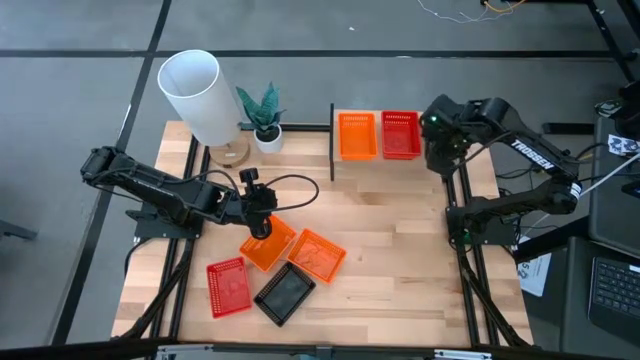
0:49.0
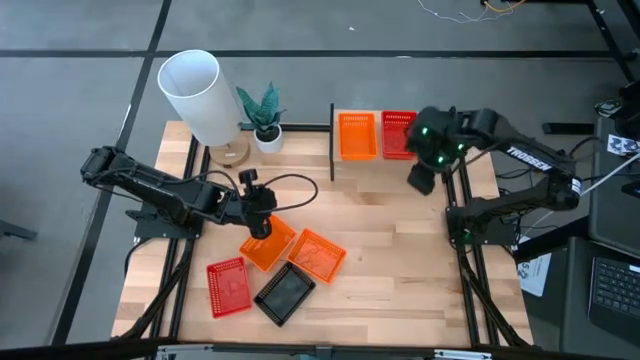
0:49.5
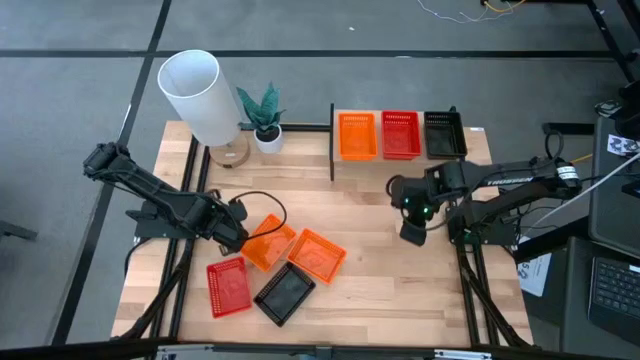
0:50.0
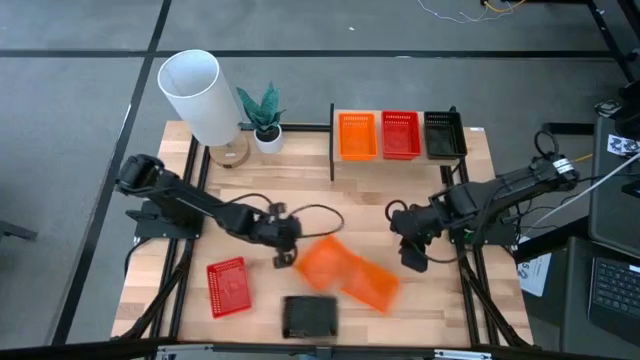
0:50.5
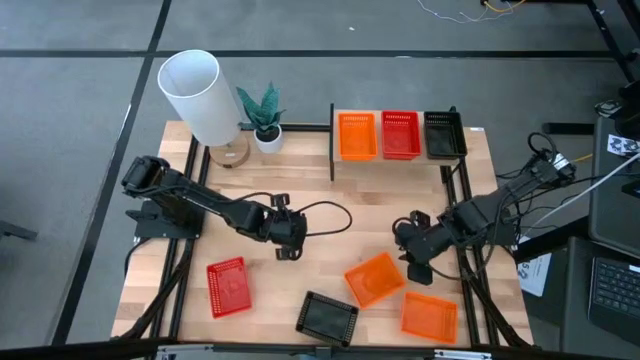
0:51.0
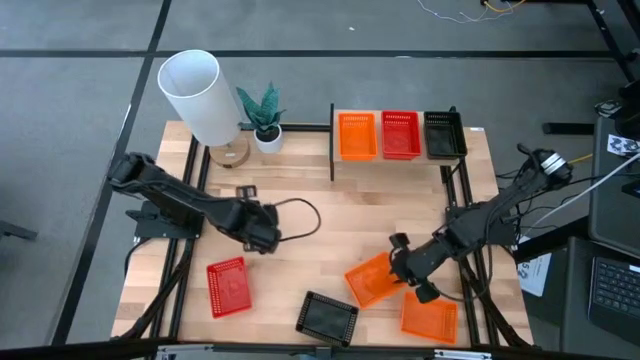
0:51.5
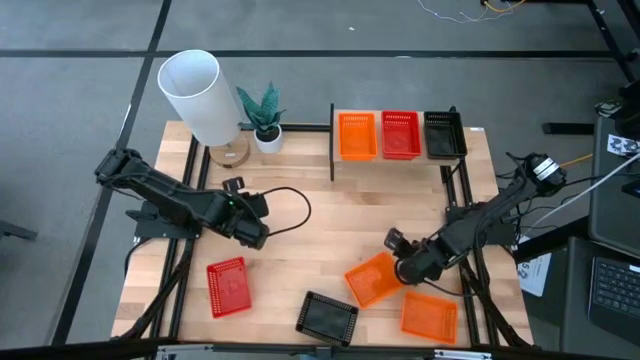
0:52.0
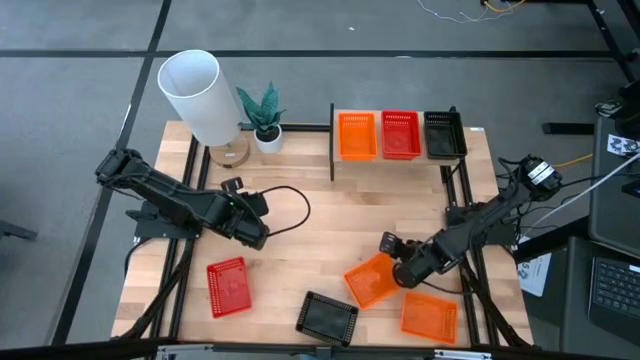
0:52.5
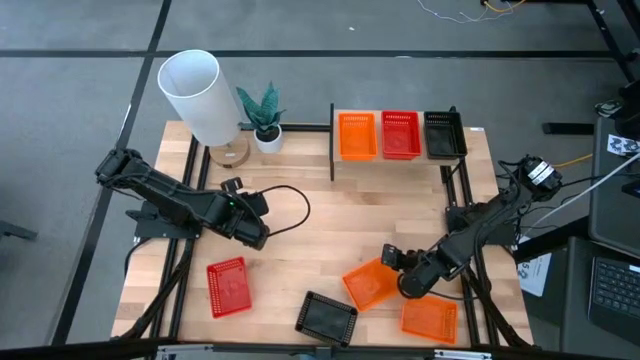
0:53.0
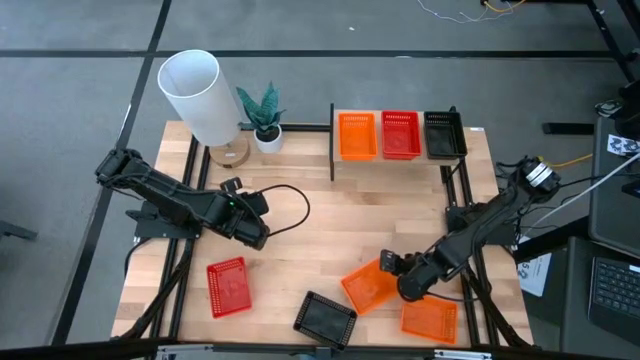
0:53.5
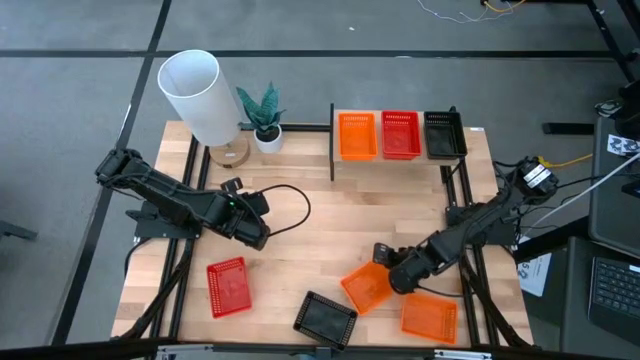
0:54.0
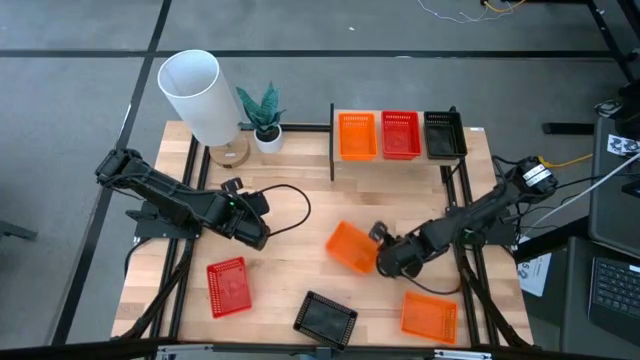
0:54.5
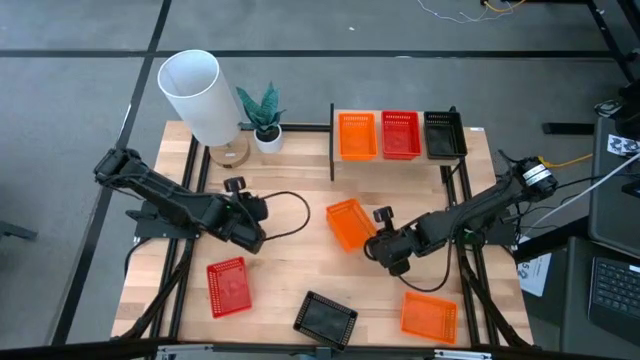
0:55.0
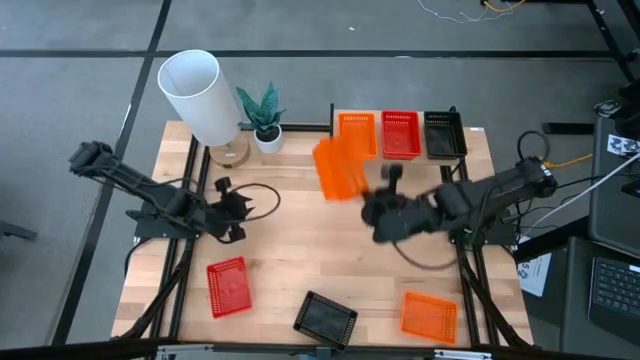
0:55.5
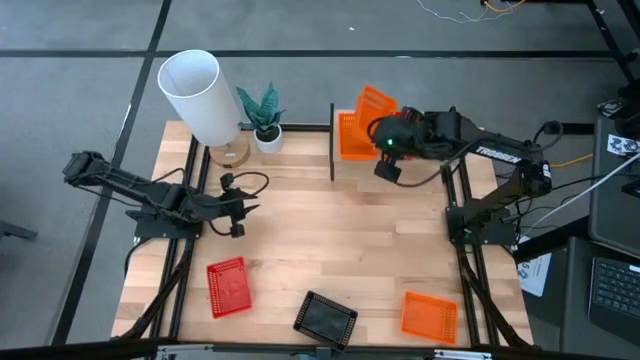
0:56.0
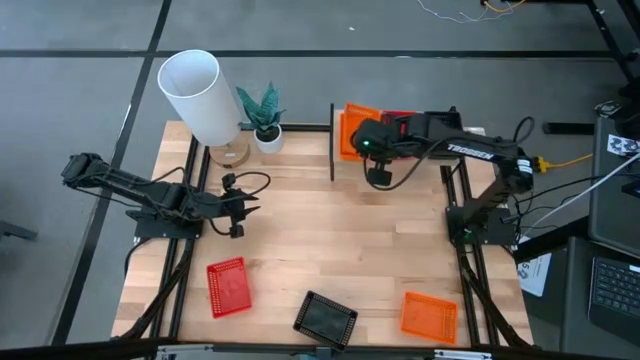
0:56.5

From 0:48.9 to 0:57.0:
Task: Stack baskets on shelf by color
Stack the left orange basket on top of the orange basket on the shelf

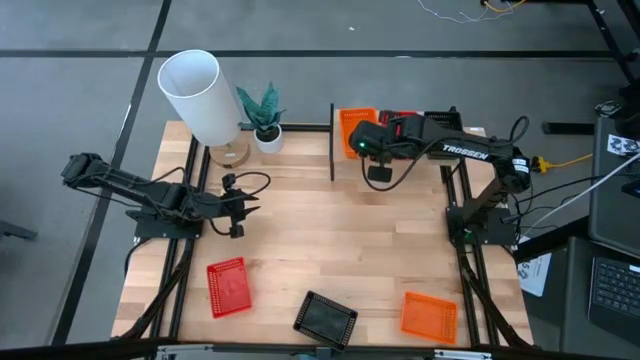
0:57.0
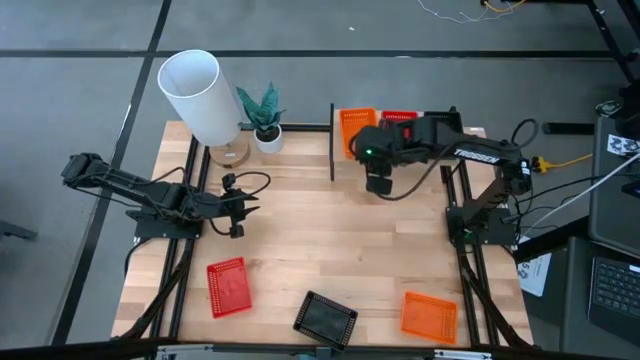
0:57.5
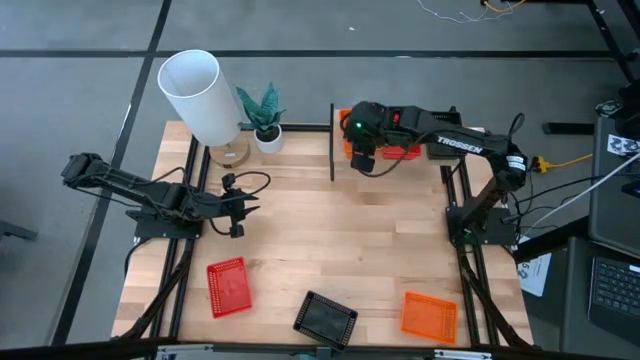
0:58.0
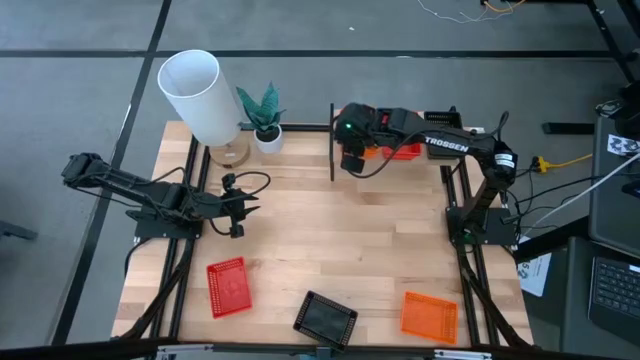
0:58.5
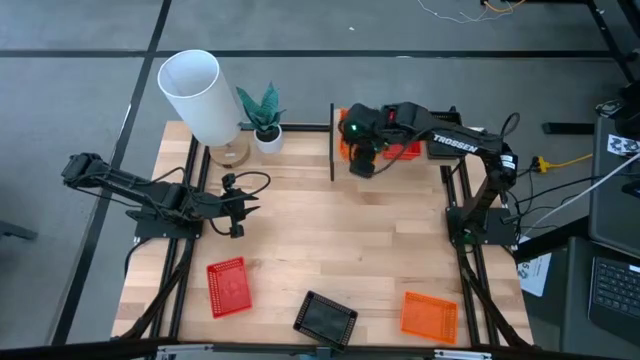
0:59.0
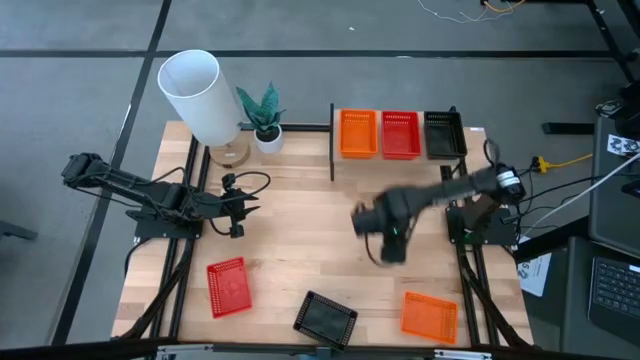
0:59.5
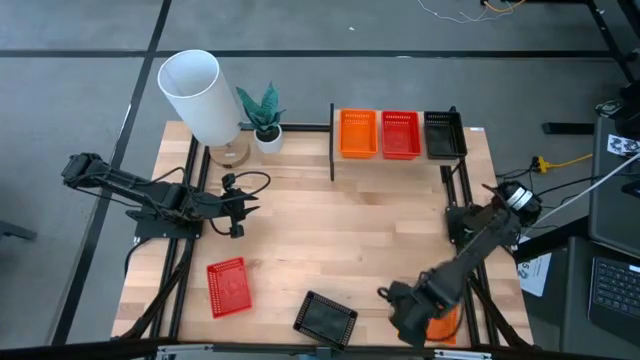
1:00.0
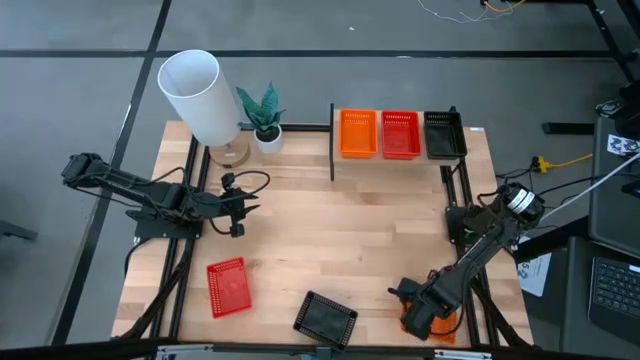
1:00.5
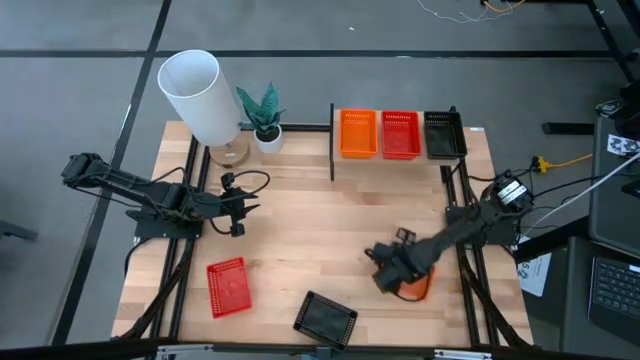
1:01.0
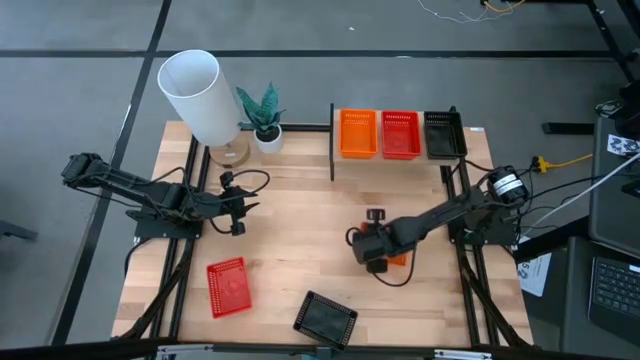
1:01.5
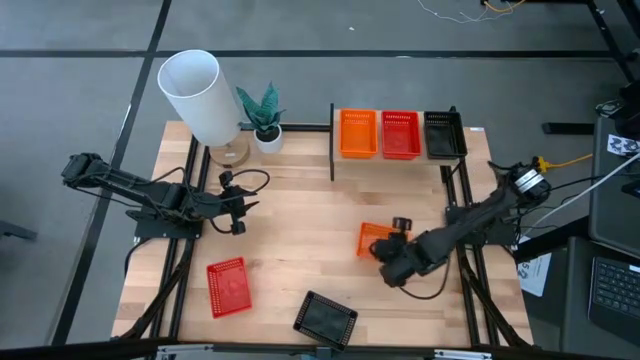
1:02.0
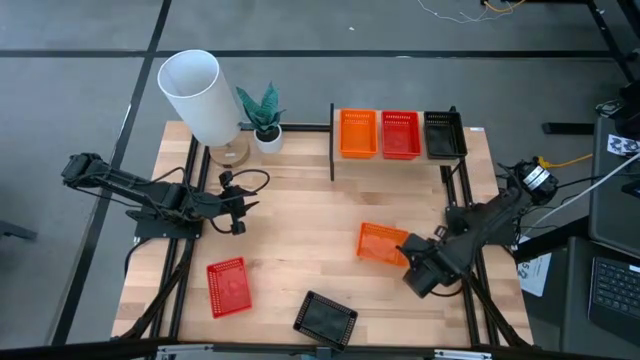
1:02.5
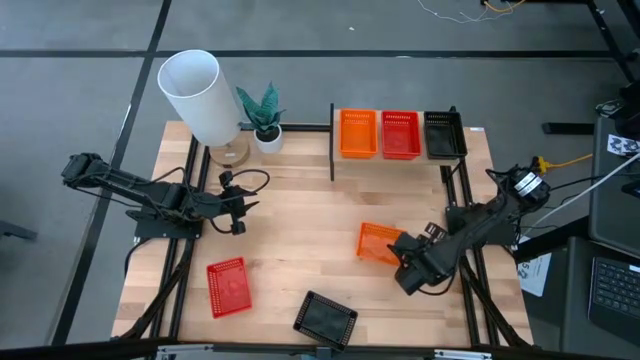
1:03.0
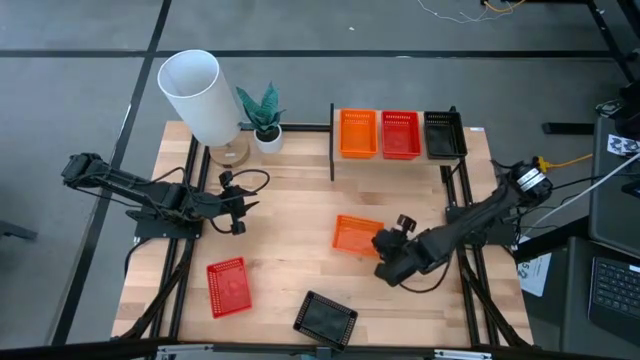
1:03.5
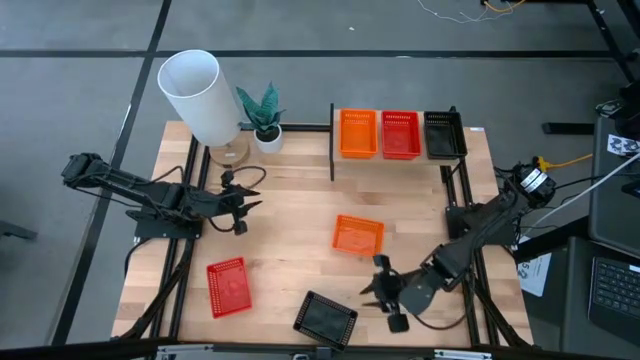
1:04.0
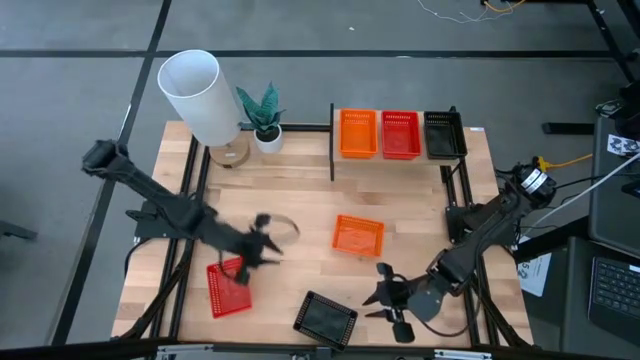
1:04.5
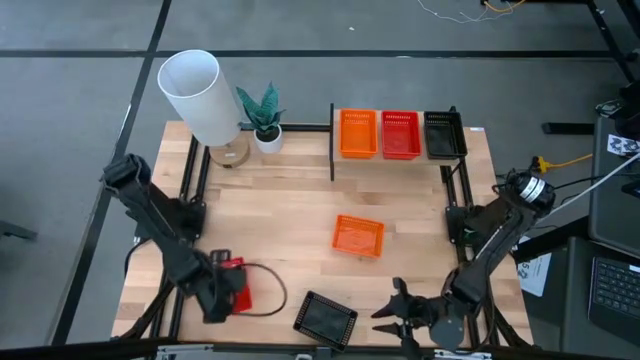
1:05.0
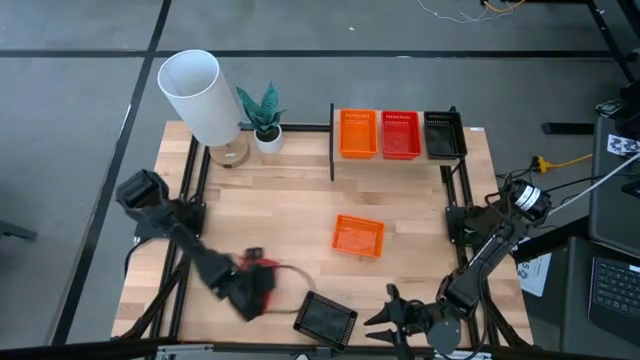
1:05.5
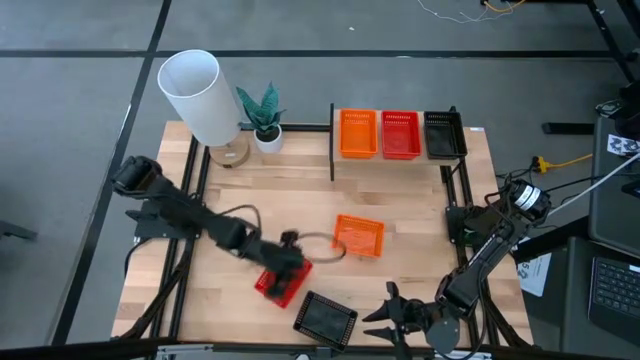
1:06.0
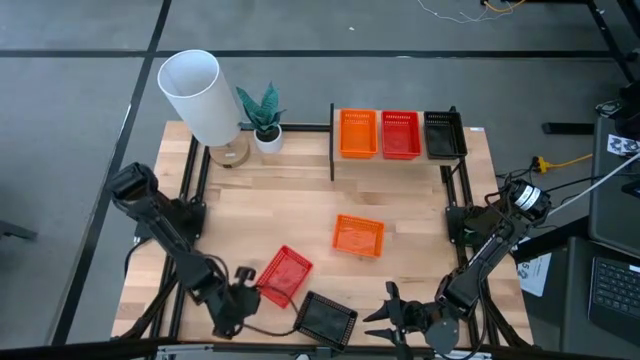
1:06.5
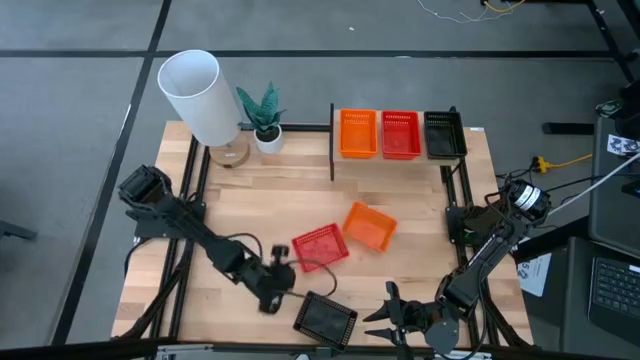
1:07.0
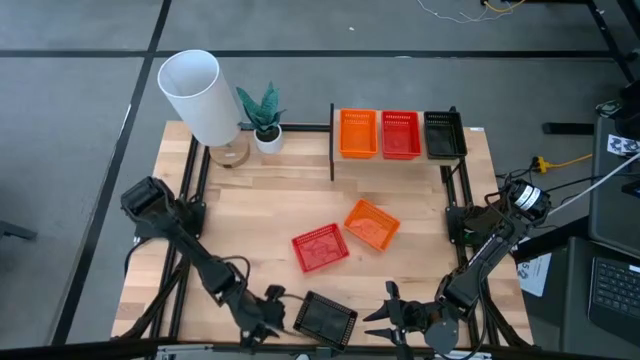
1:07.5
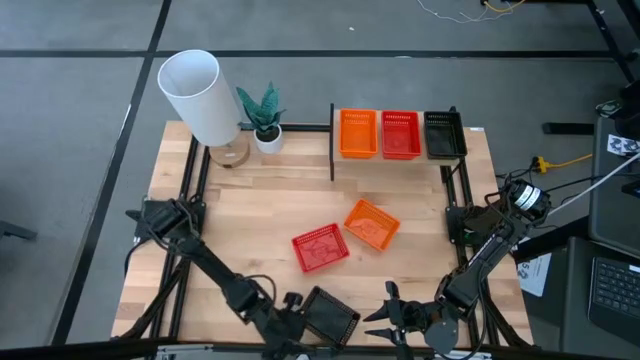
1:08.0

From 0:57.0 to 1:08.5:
Adjust the baskets

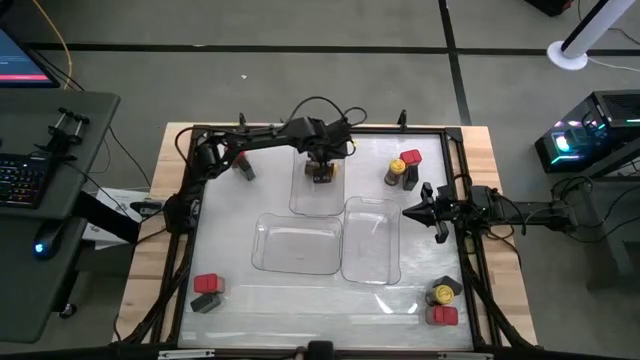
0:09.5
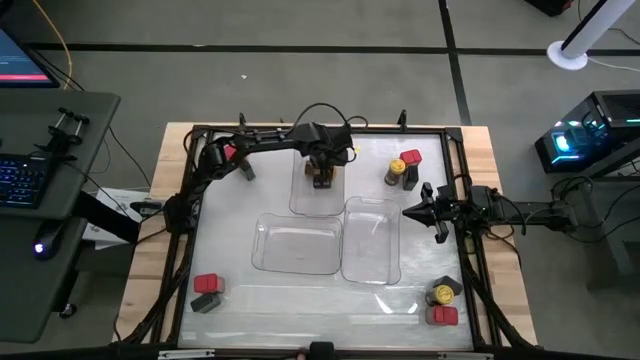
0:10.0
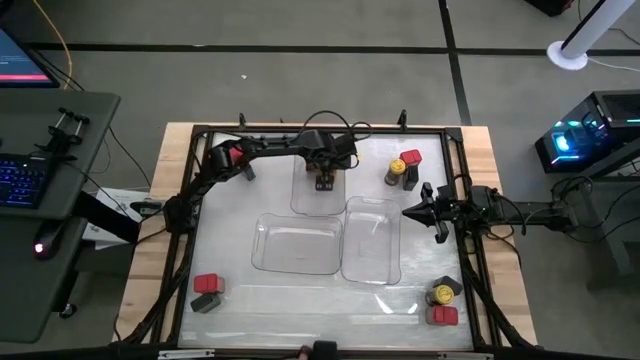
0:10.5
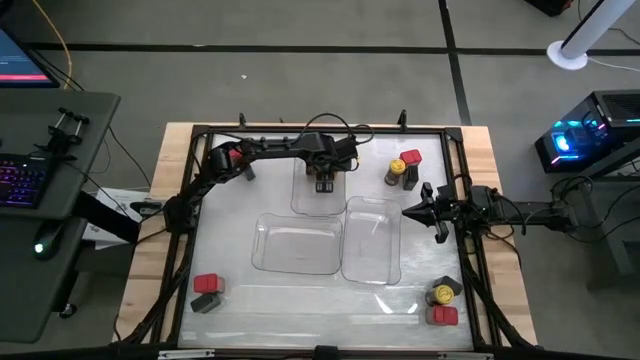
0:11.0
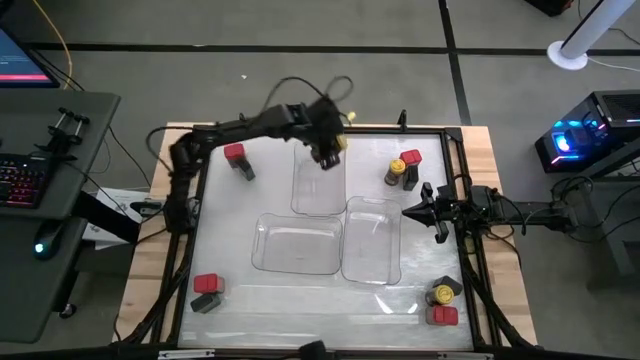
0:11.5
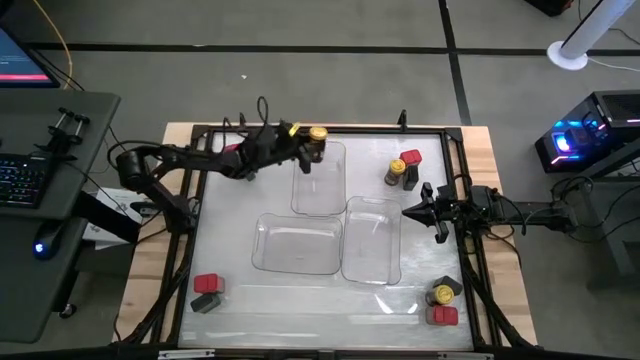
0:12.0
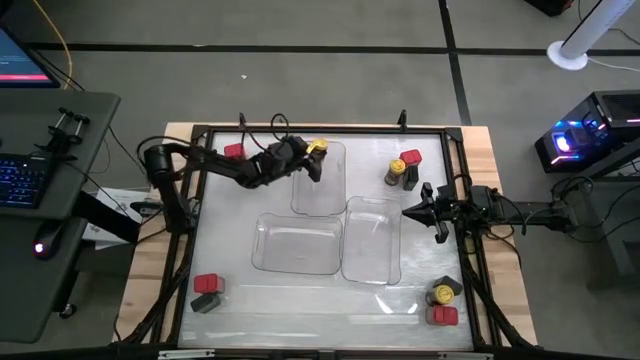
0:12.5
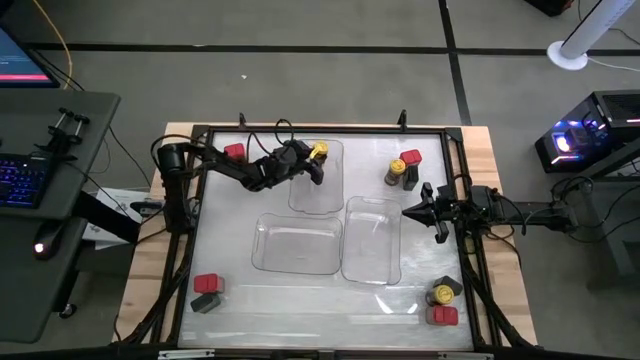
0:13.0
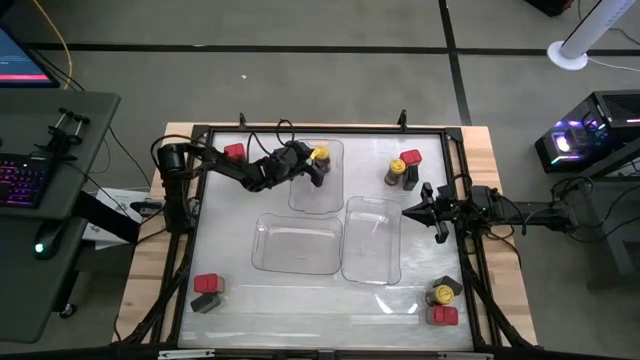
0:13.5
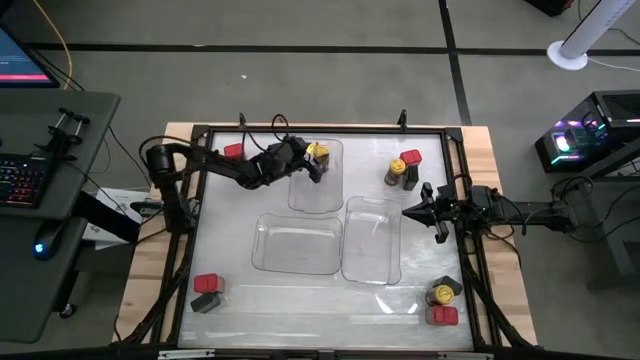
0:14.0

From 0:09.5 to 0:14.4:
Task: Sort spices by type
Put the top left yellow seasoning bottle into the top transparent bin
